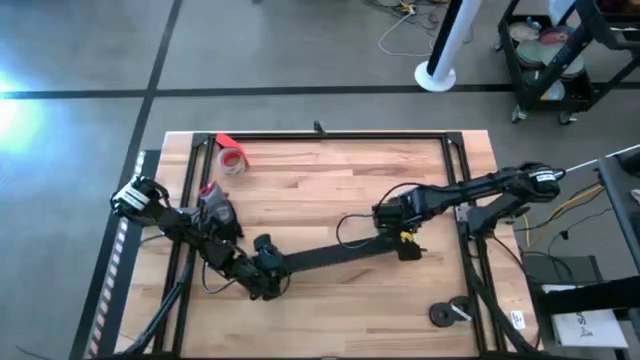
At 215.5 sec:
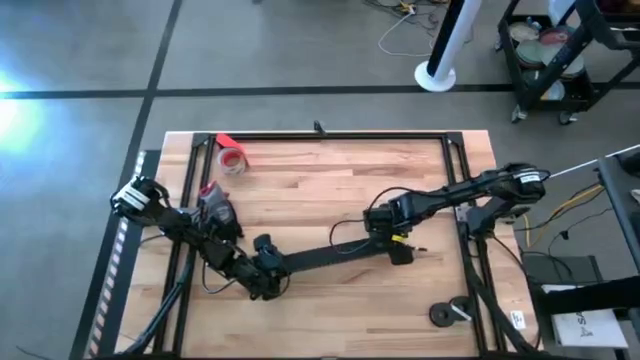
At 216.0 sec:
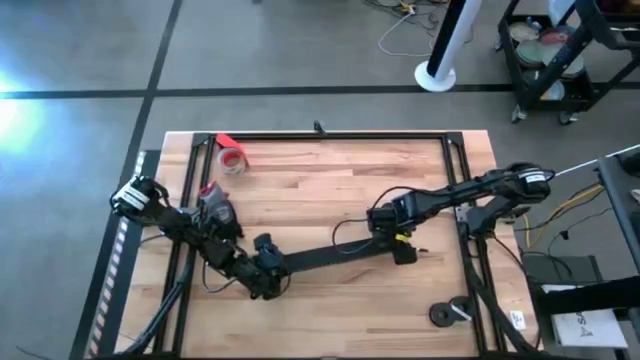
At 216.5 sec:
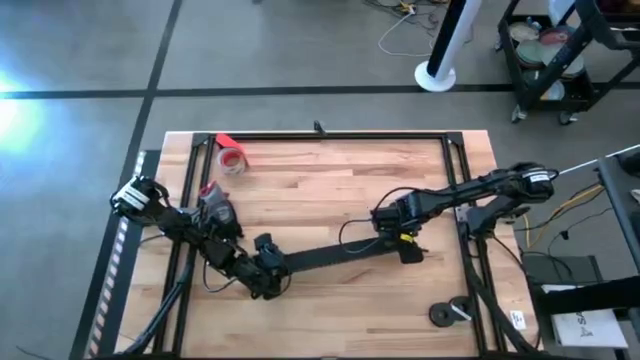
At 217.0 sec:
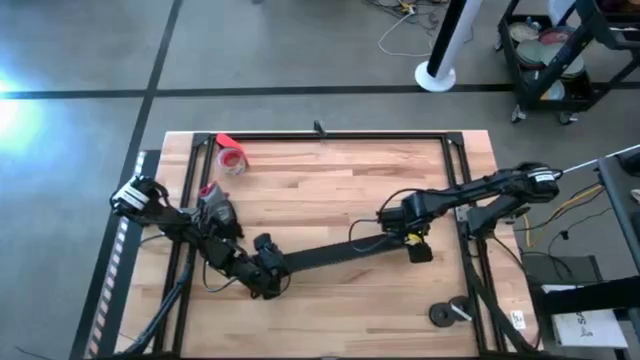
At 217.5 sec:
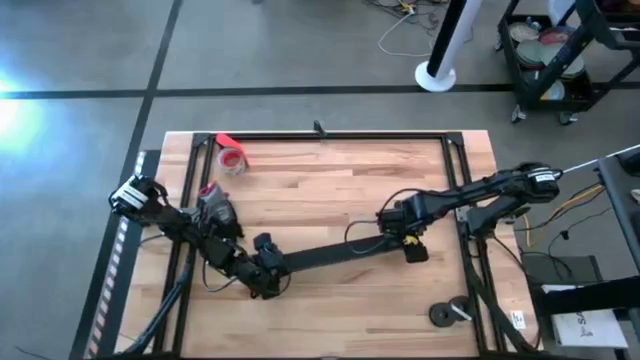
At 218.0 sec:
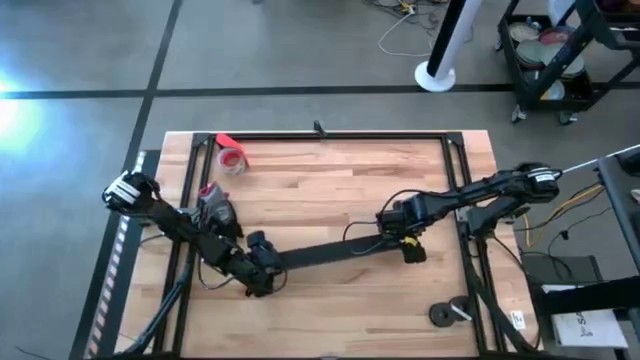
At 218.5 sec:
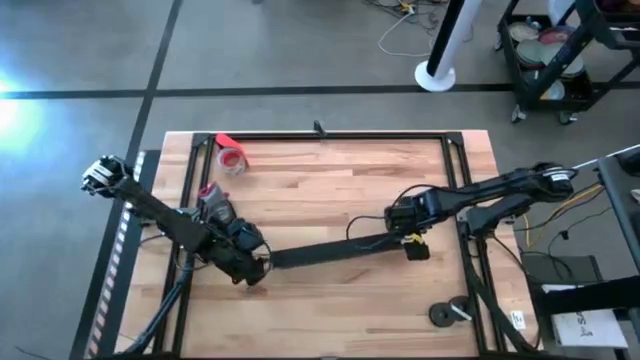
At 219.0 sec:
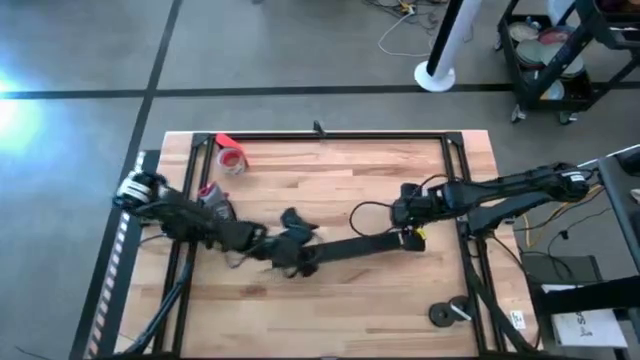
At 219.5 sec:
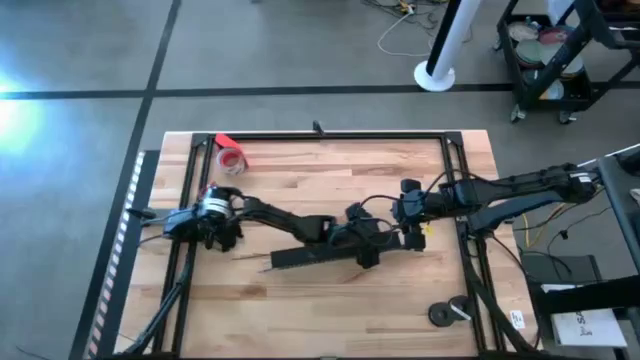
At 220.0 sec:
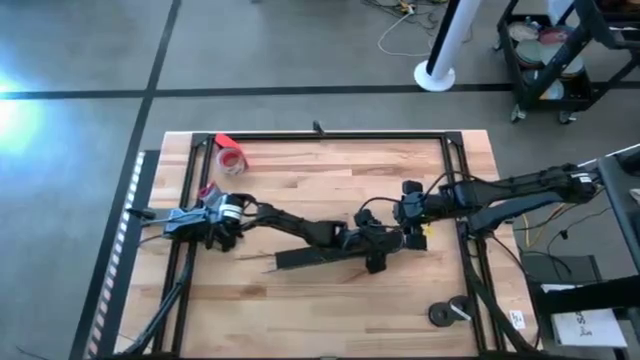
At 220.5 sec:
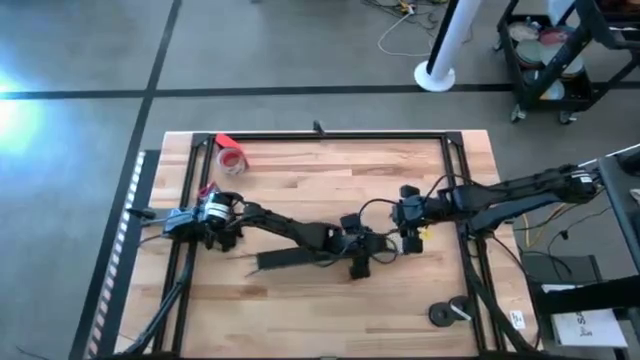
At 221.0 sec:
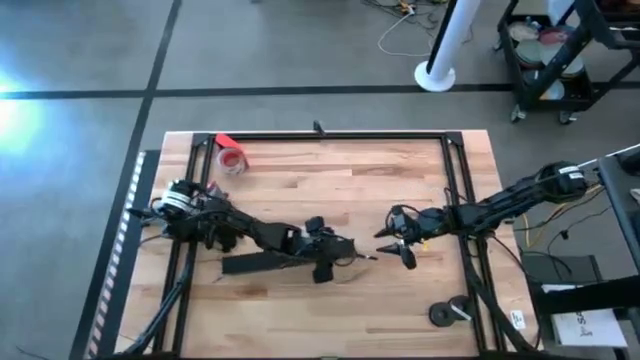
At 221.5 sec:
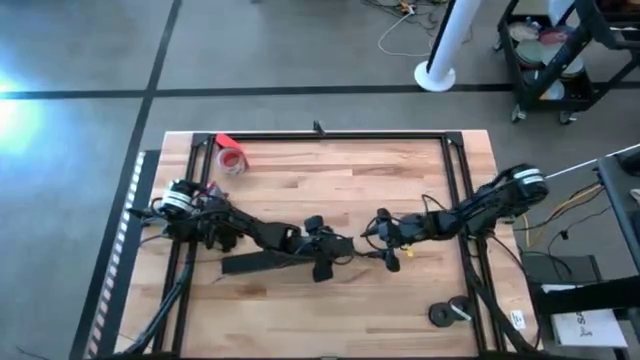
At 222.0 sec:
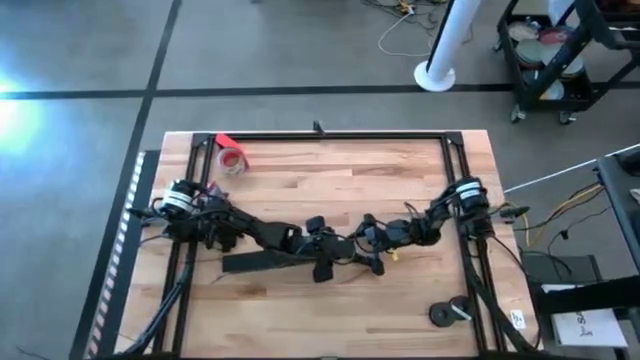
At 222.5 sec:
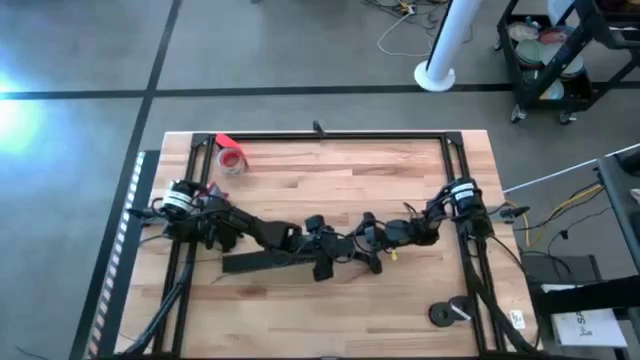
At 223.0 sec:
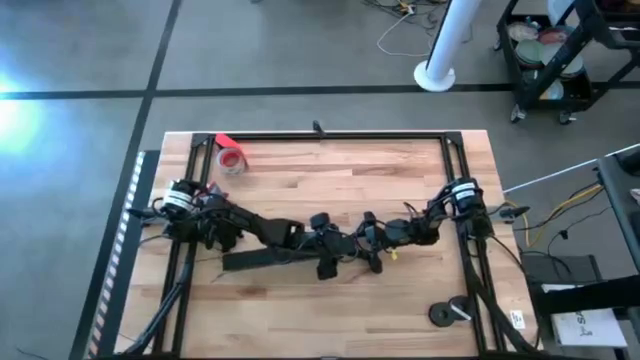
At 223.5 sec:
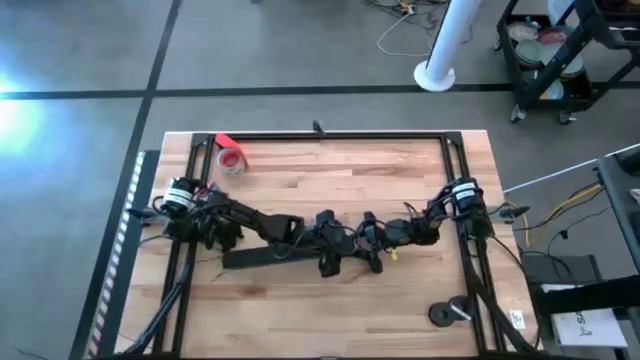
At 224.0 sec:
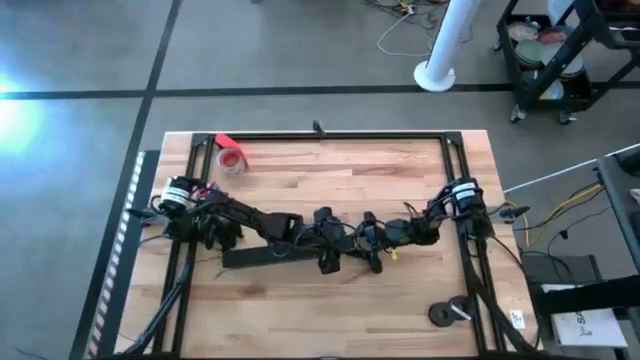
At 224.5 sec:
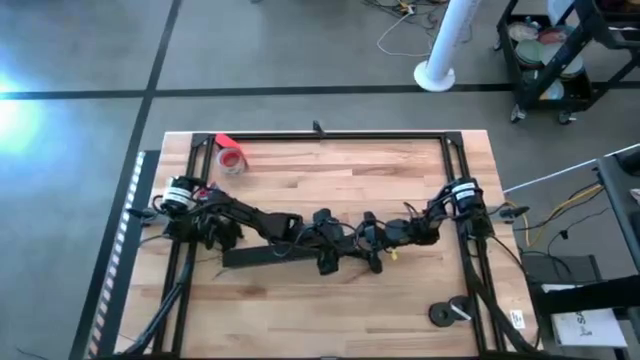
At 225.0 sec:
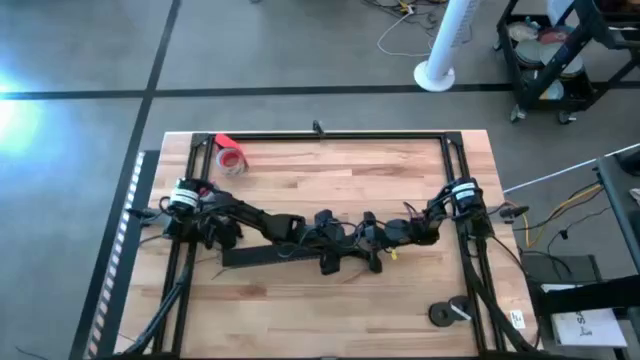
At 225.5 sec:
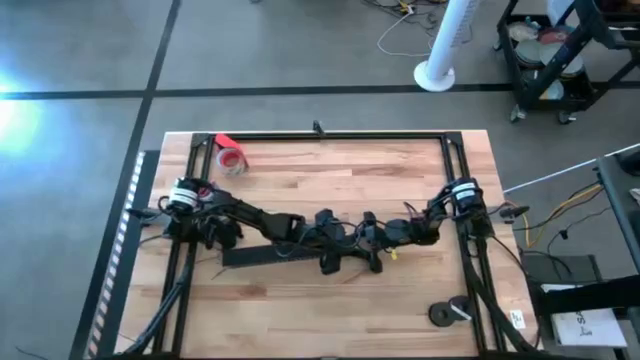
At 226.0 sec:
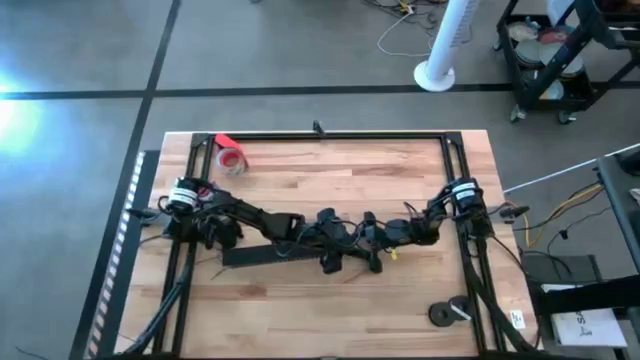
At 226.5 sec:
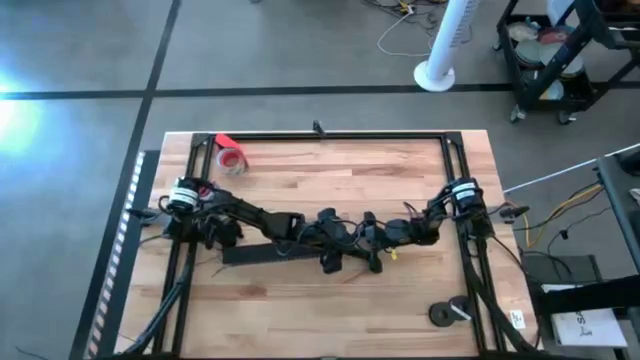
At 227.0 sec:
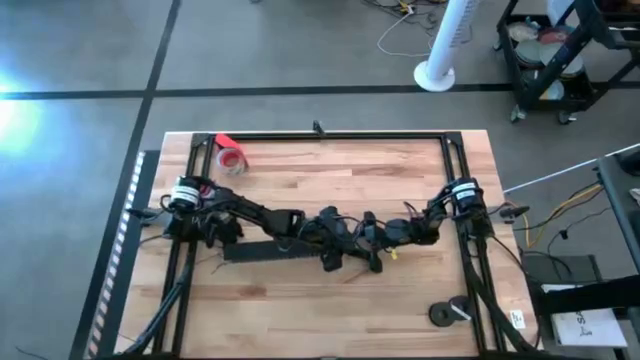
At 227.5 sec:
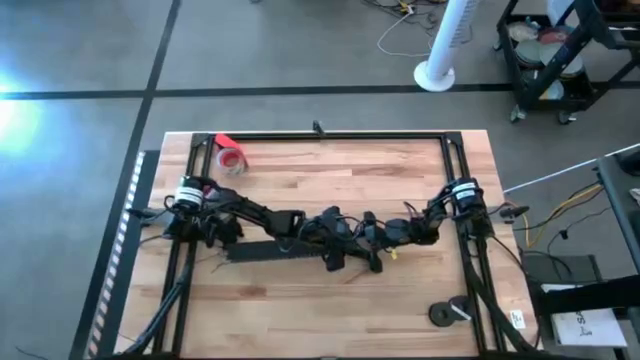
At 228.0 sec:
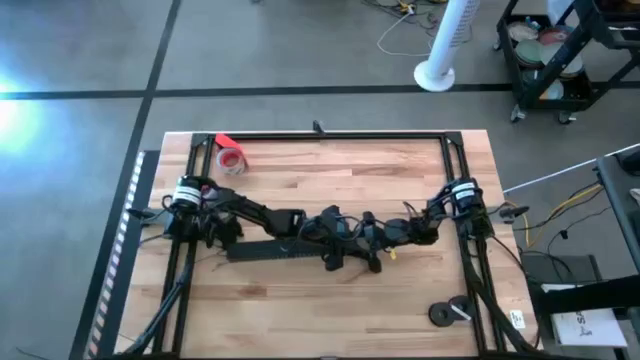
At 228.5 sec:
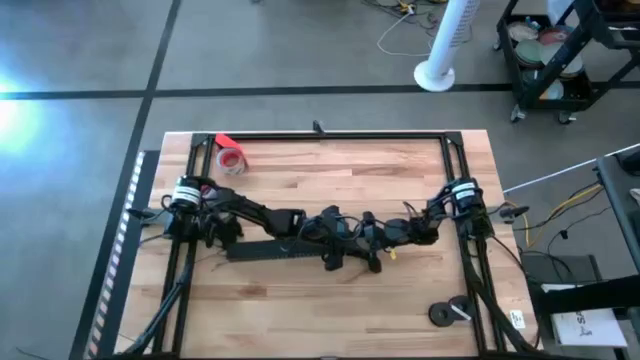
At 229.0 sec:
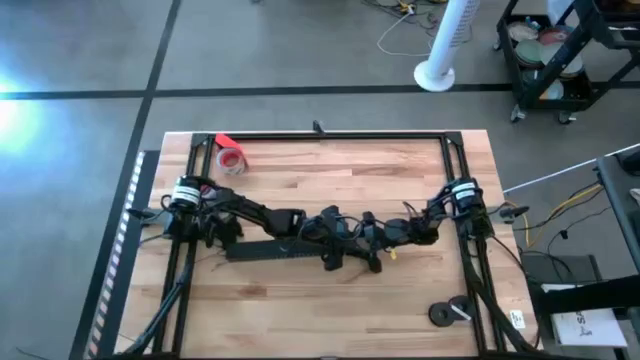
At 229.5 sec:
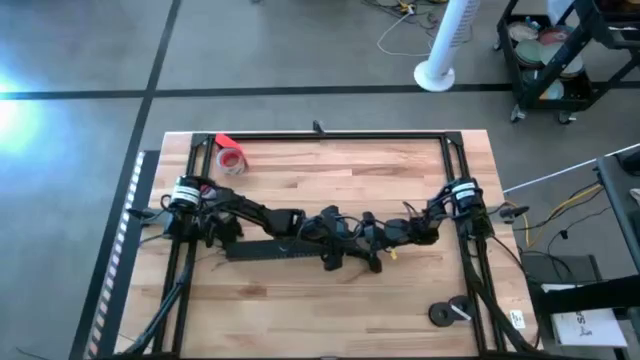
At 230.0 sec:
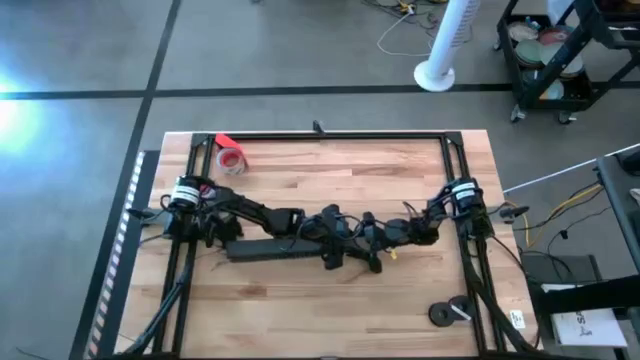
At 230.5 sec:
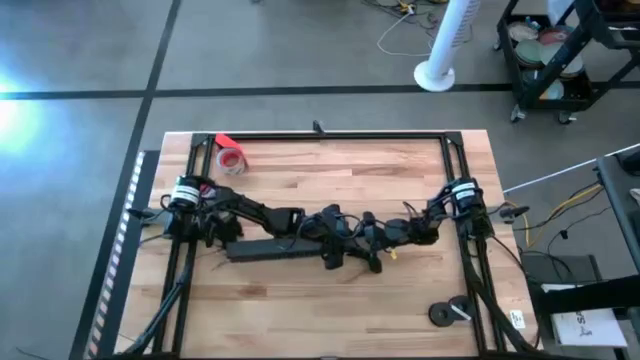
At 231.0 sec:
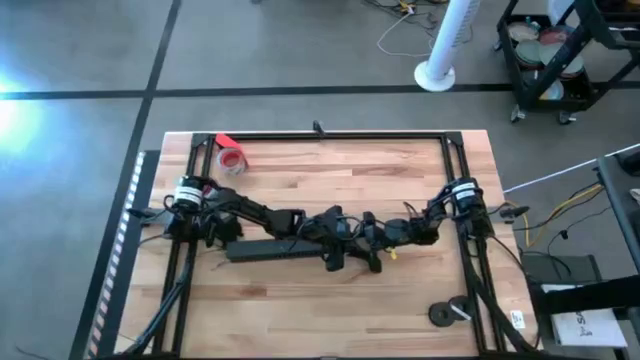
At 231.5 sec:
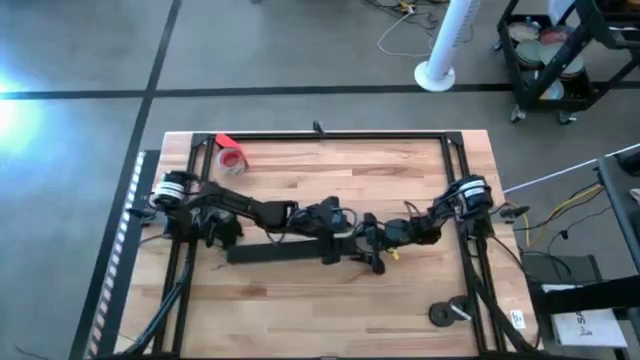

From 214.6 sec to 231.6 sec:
Task: Ziptie cables
Close the black cable duct

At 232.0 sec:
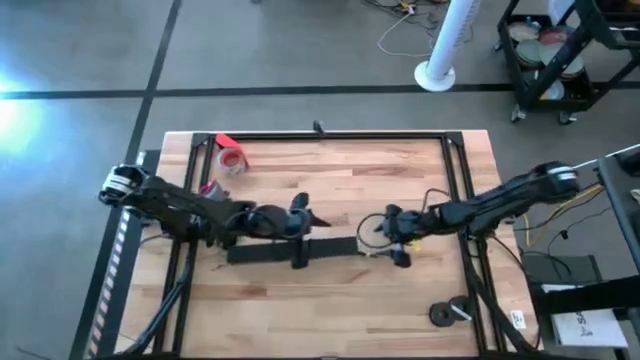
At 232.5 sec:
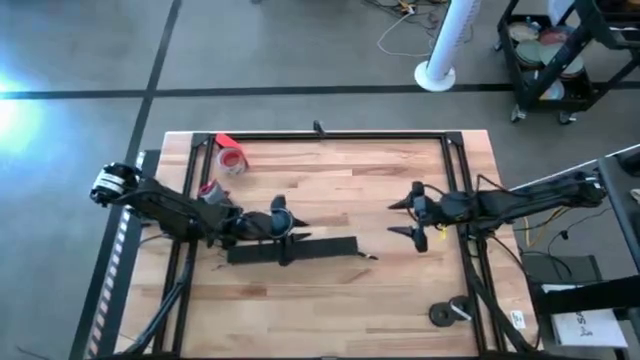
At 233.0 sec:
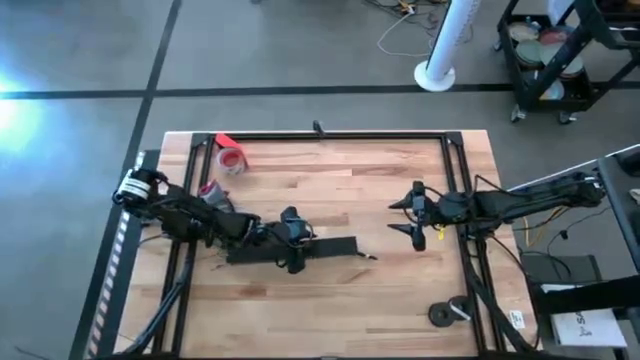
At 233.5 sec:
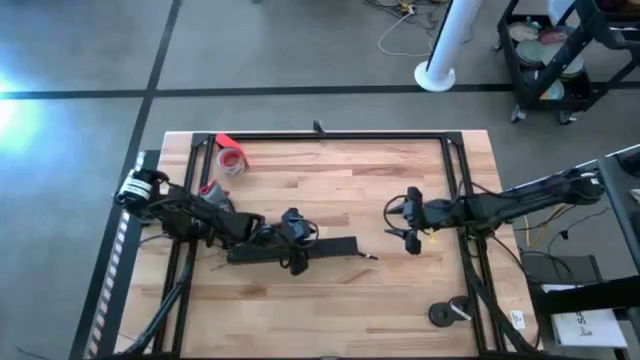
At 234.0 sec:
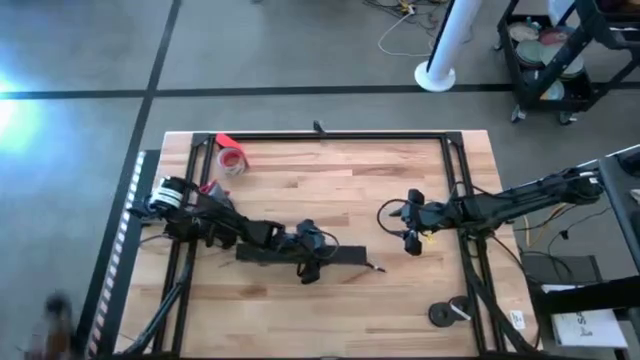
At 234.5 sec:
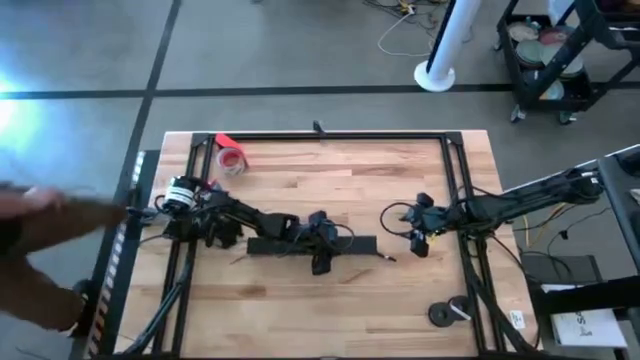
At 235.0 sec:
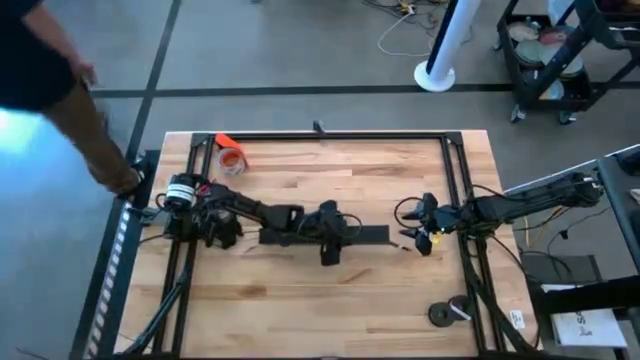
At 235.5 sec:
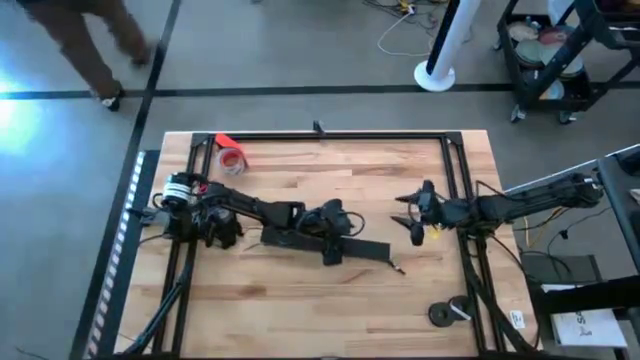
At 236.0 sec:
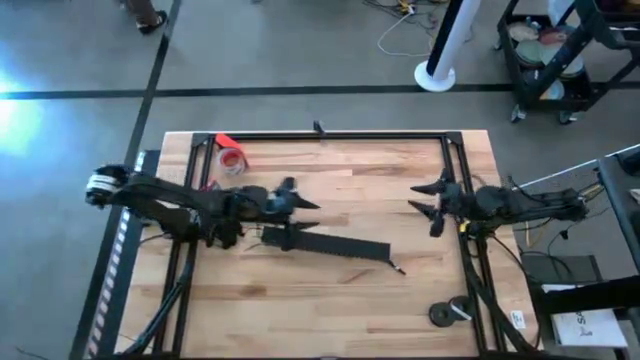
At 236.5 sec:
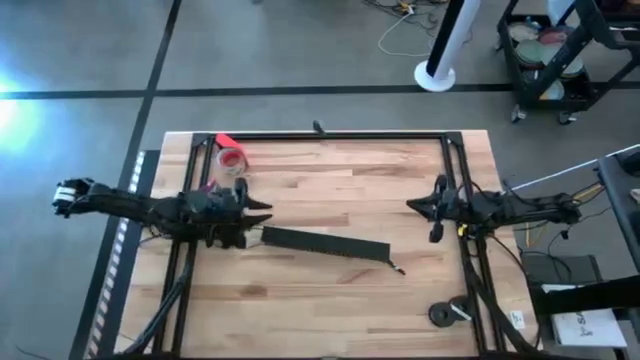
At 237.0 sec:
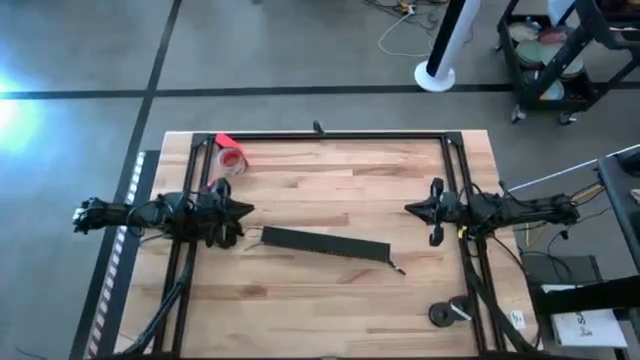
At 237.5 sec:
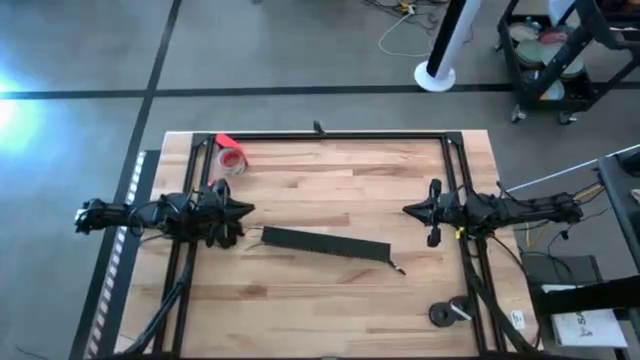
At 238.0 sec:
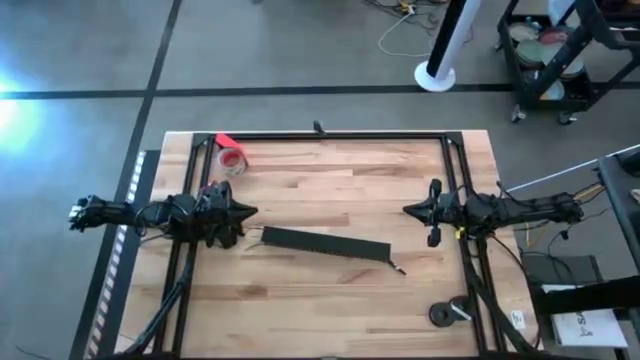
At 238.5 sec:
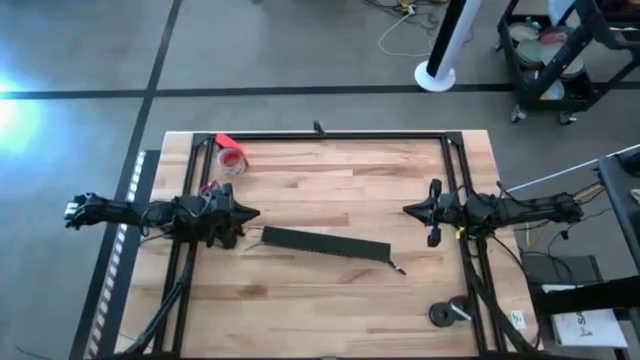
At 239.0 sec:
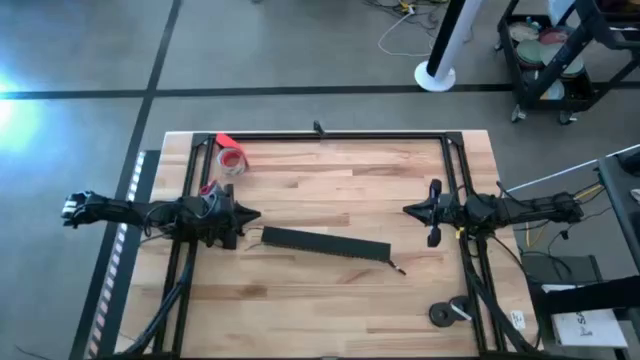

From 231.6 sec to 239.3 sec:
Return to Home Position
